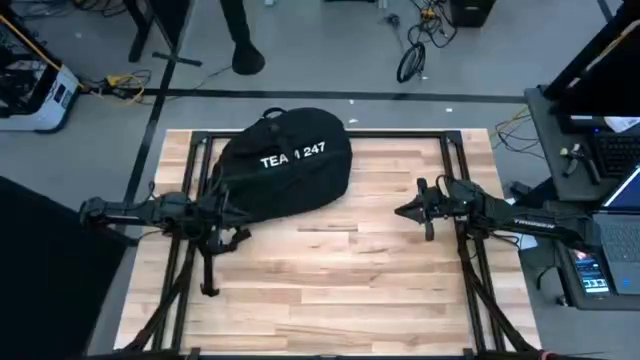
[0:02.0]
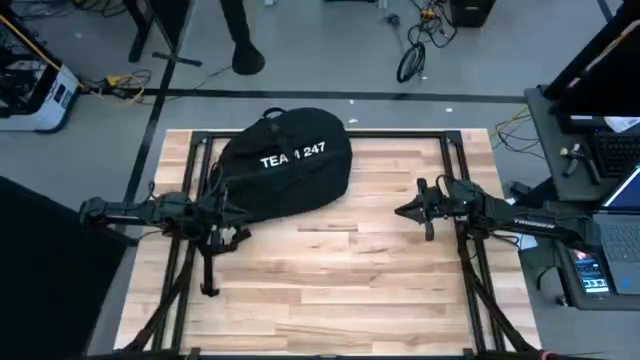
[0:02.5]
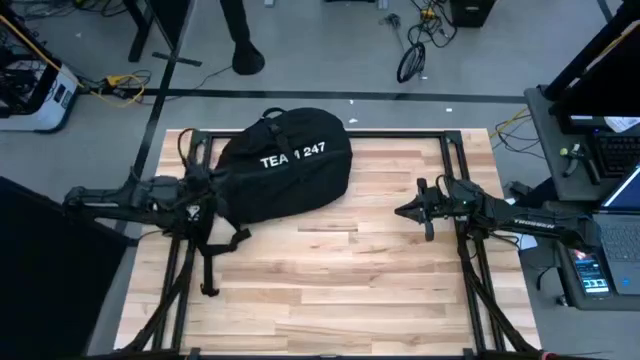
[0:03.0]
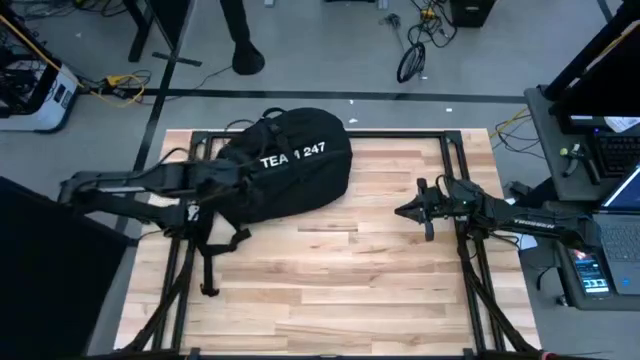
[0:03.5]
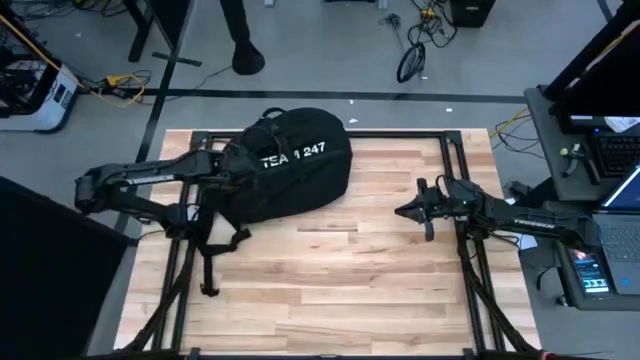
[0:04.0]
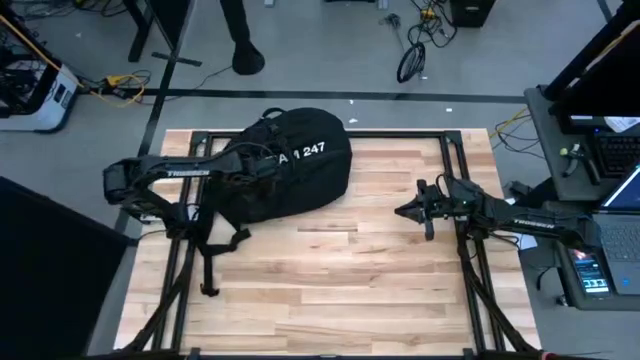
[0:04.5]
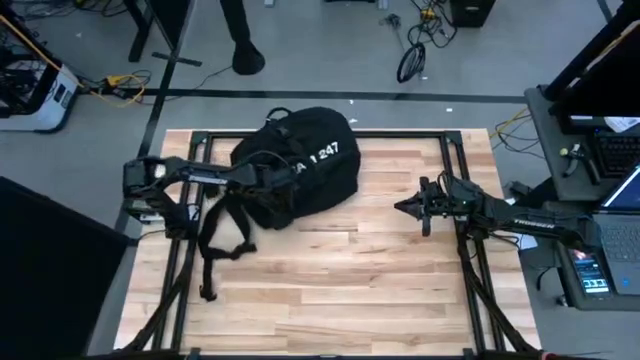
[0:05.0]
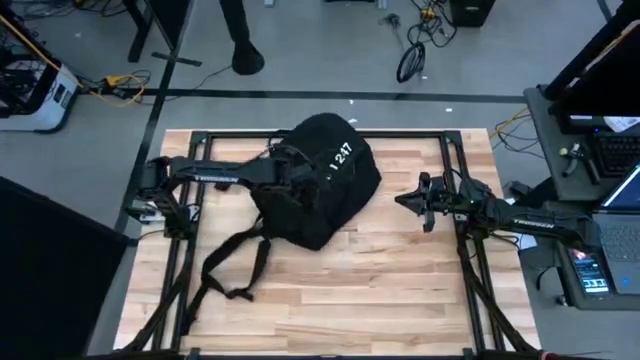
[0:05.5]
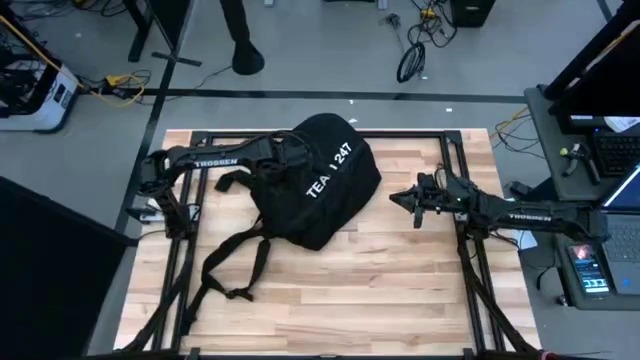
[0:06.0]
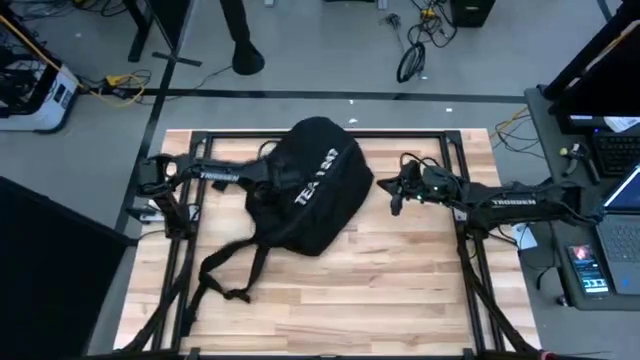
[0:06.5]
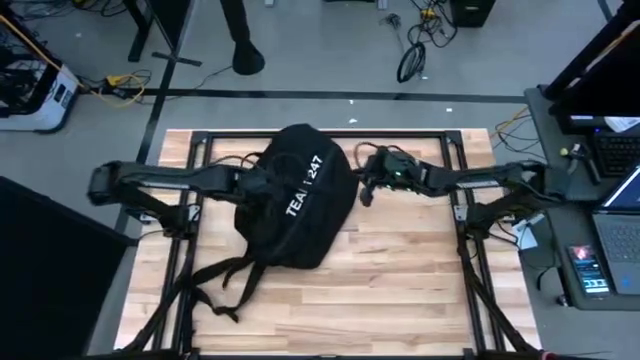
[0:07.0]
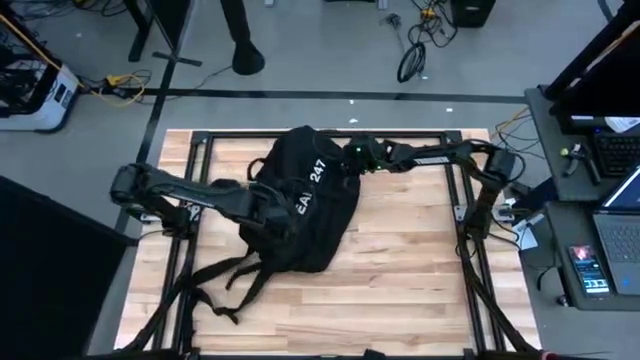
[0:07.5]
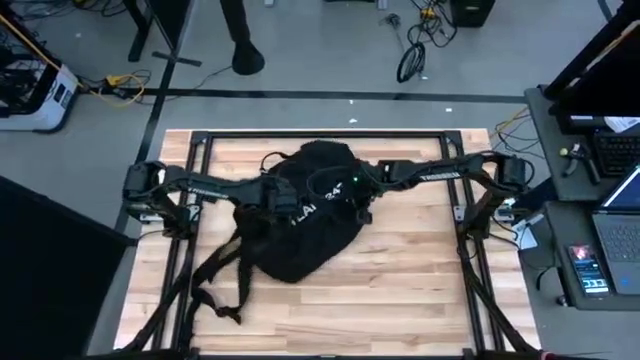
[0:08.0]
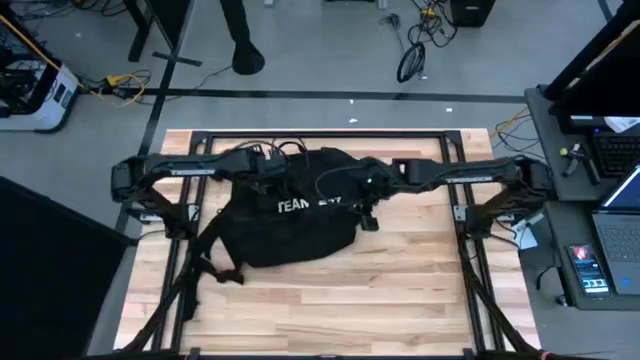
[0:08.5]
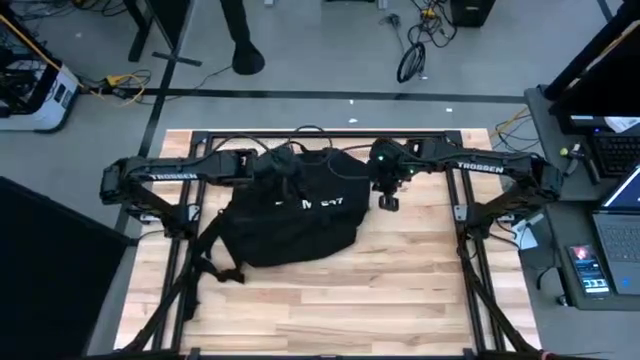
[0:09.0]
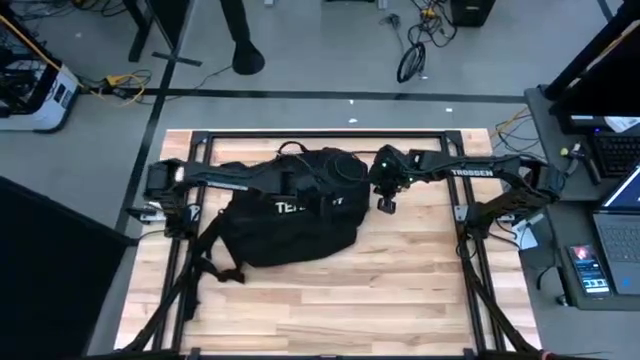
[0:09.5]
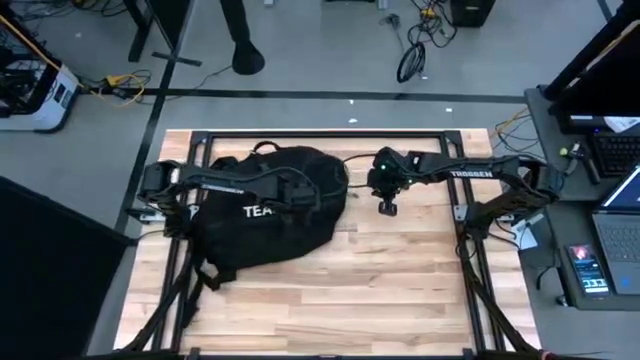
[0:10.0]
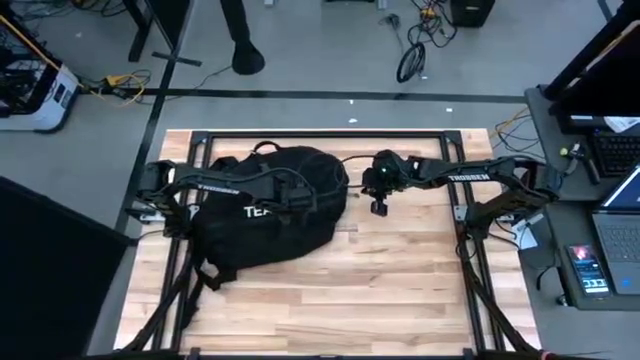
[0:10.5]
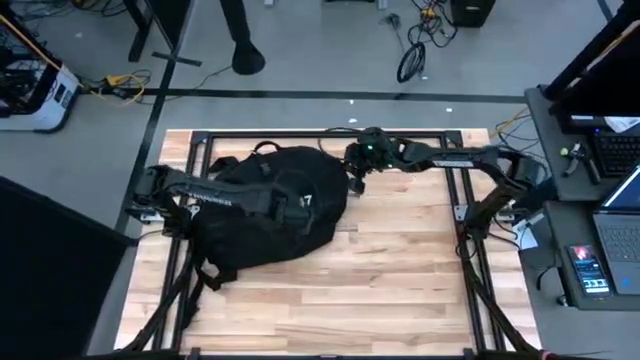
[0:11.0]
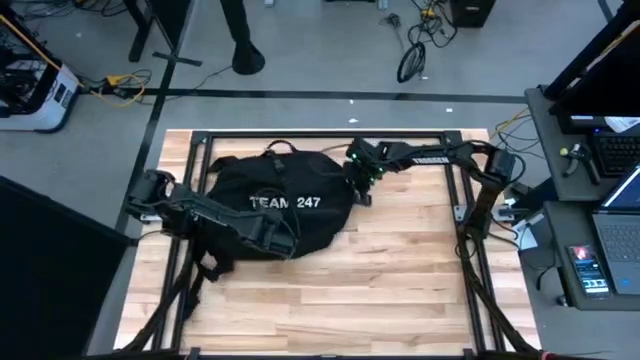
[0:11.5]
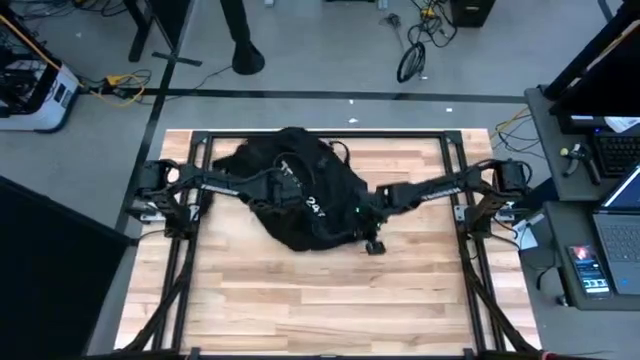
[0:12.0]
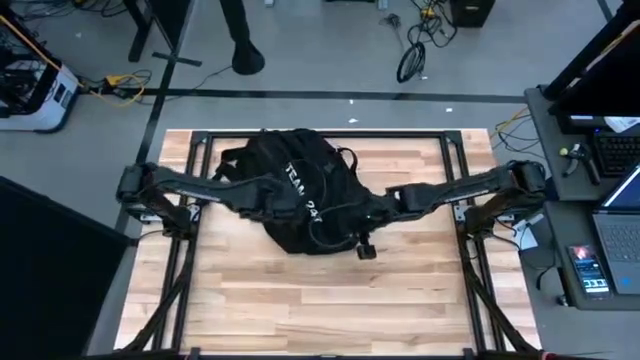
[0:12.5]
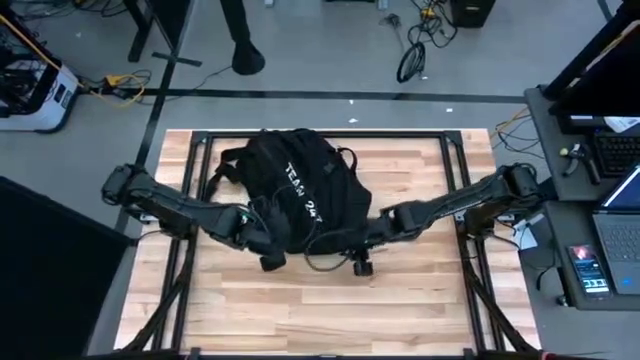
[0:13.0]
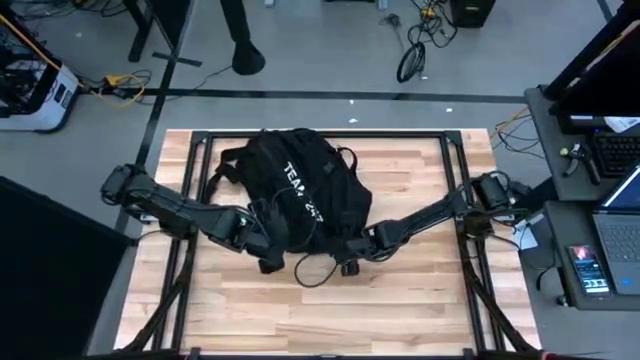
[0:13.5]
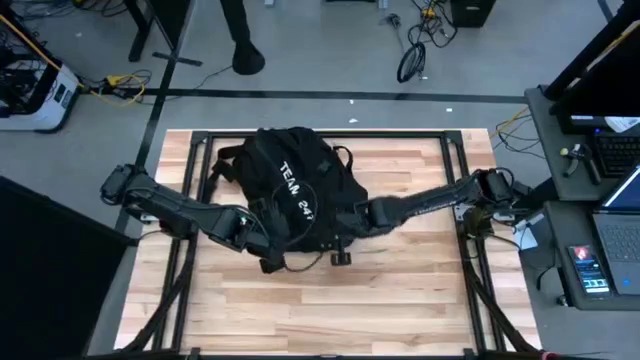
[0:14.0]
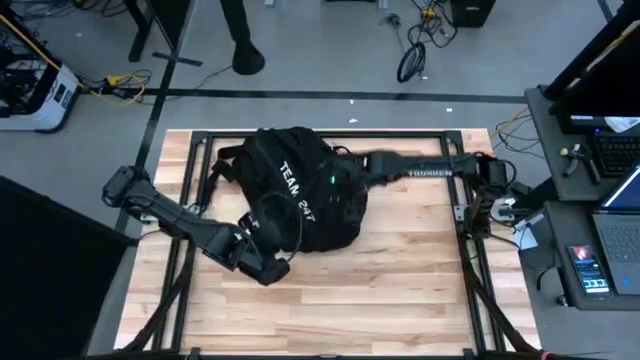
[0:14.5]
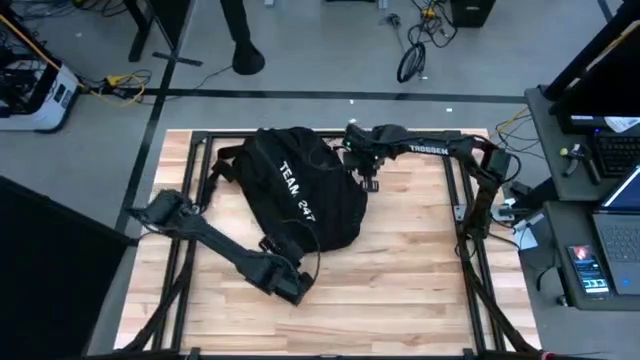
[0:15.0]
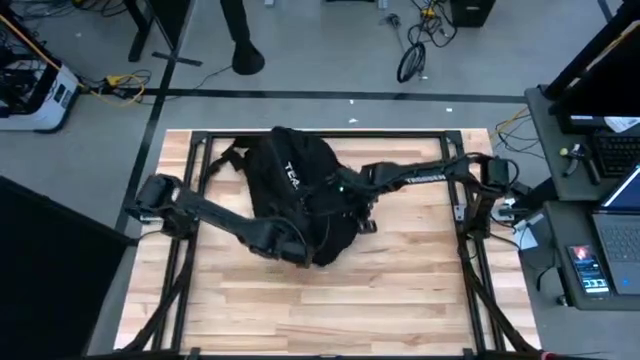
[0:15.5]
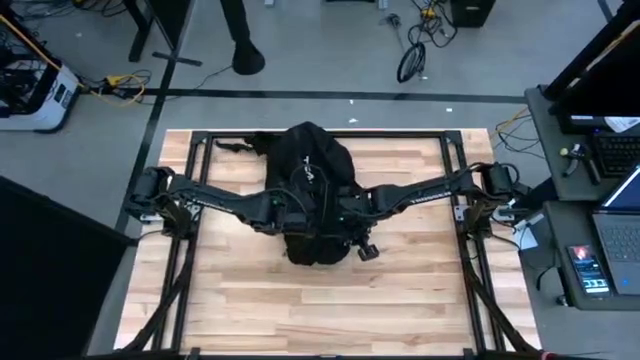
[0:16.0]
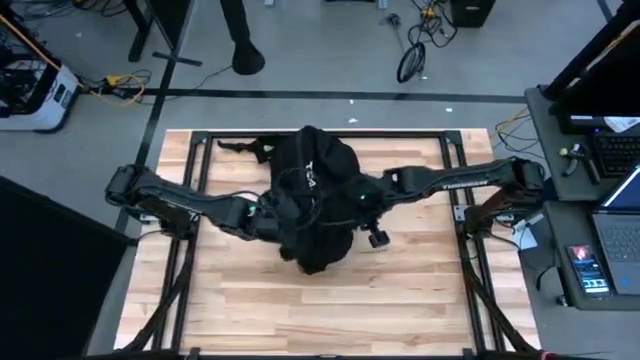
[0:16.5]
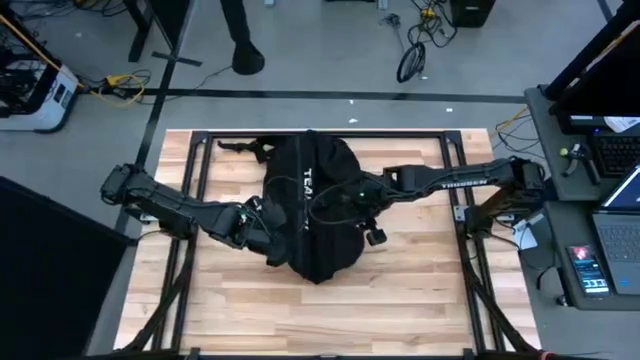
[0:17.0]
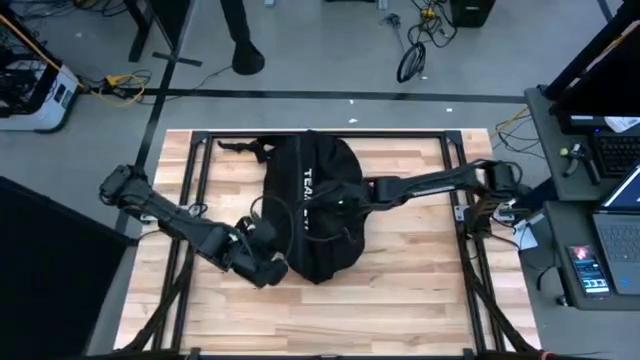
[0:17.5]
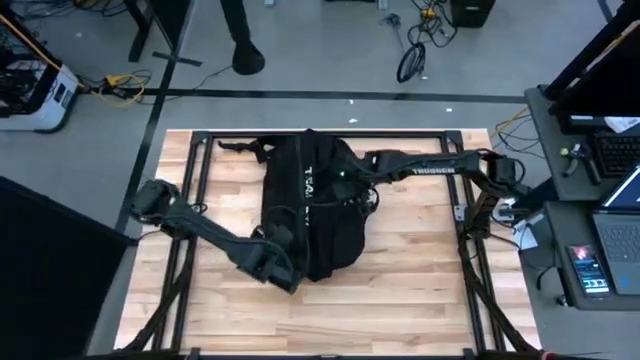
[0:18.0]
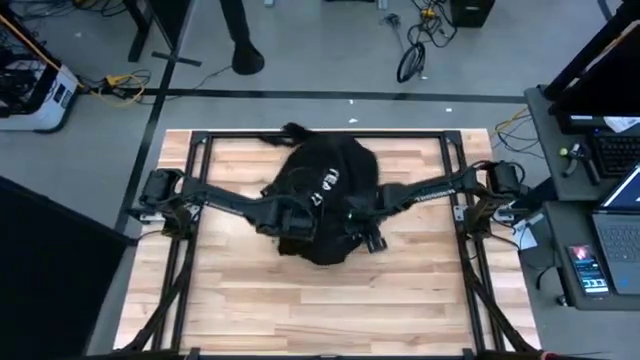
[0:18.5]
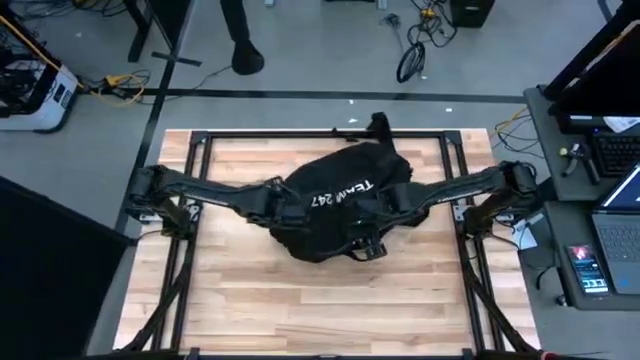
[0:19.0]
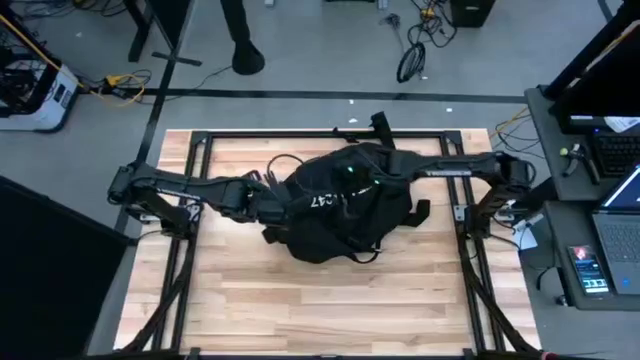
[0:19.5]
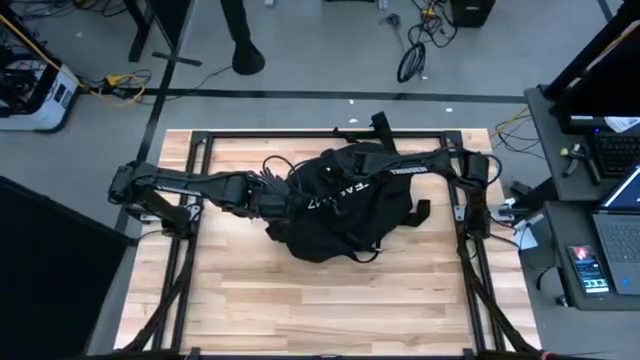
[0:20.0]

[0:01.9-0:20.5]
Task: Unpack backpack
Prepare the black backpack

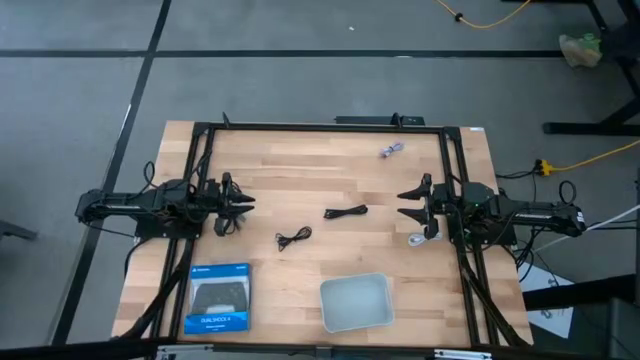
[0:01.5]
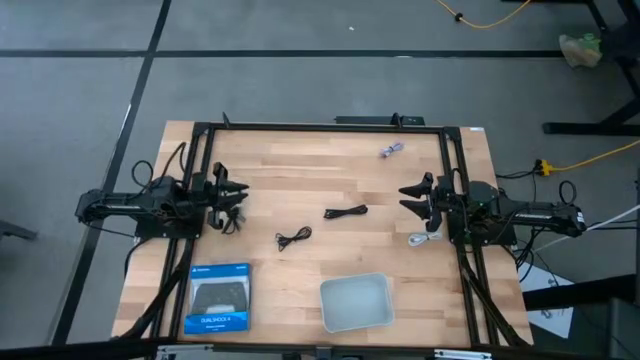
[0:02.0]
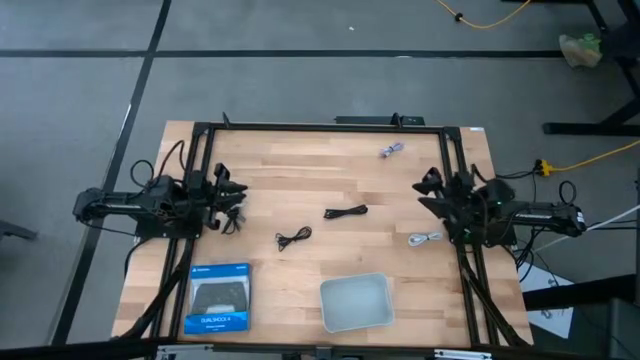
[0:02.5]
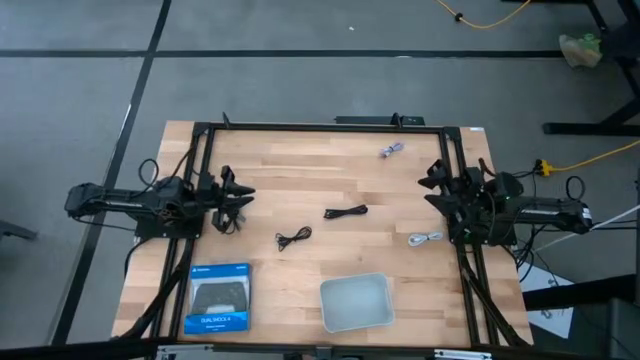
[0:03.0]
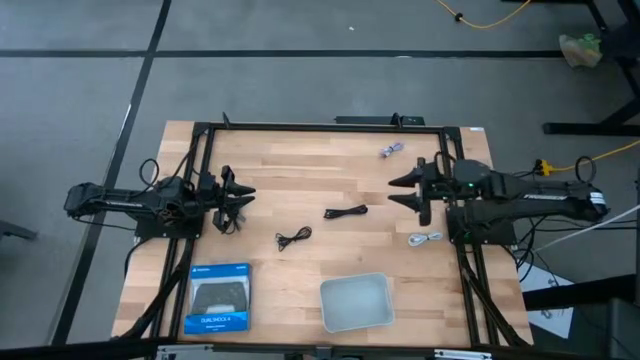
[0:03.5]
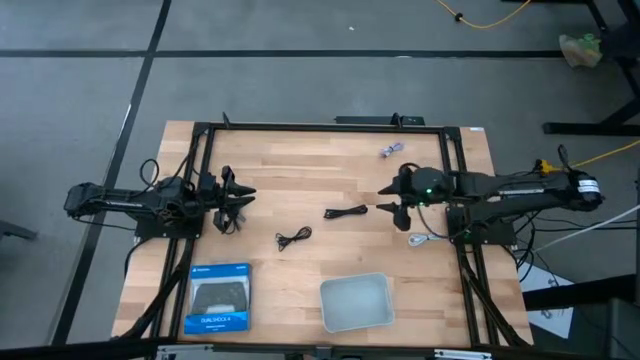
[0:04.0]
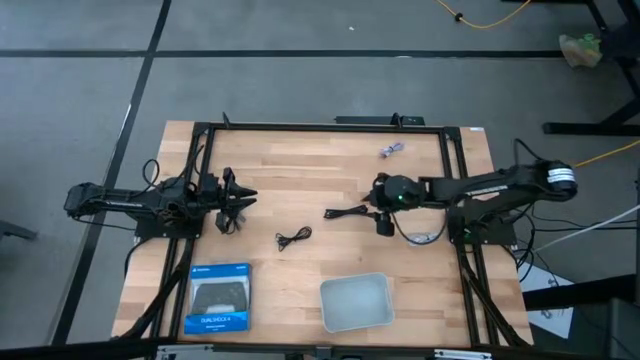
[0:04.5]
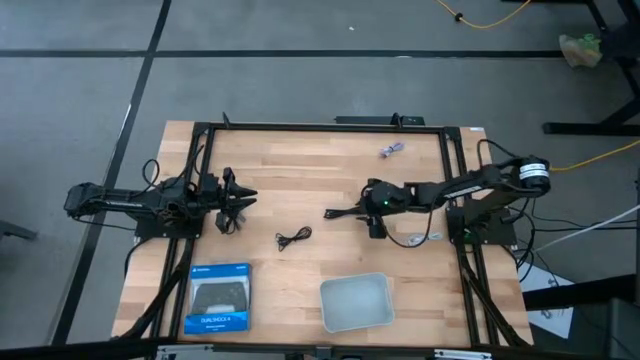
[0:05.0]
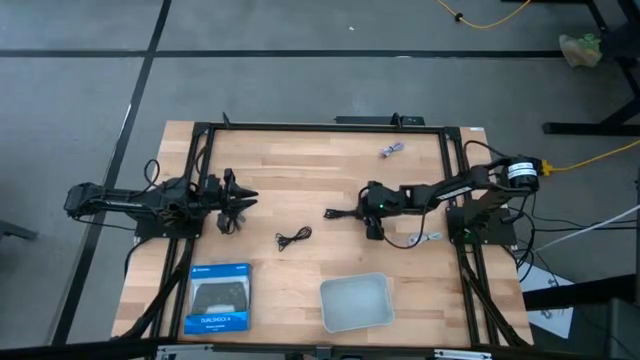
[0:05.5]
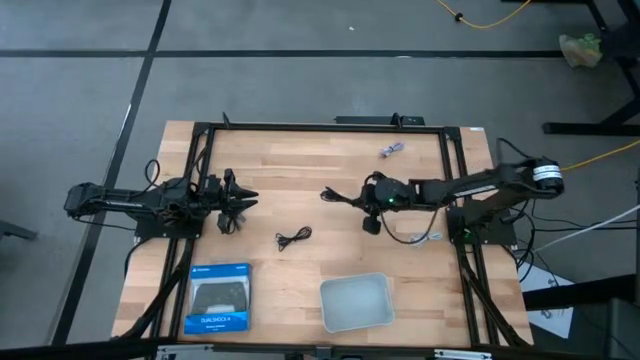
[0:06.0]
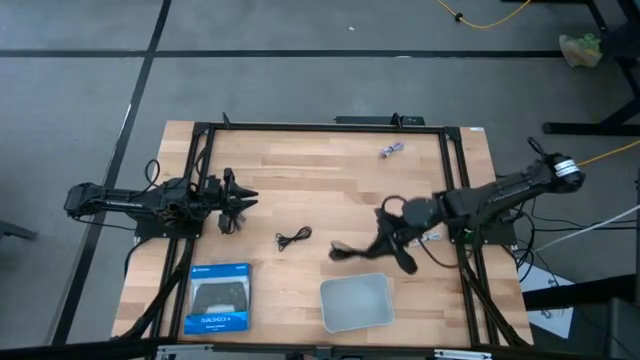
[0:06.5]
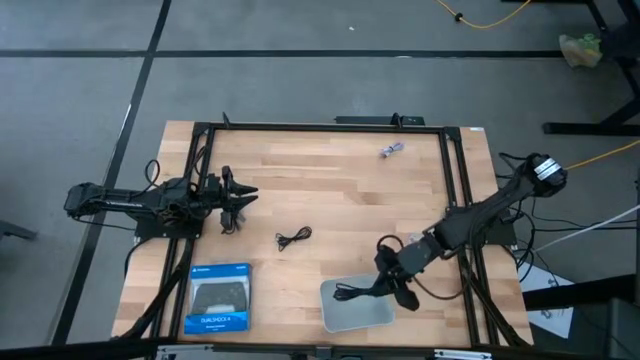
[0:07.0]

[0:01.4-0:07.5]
Task: Pick and place USB-C Cables
Put the top right black USB cable into the white bin
